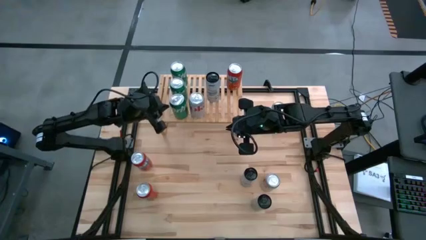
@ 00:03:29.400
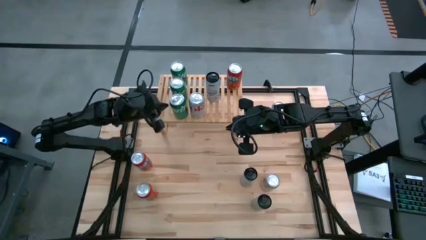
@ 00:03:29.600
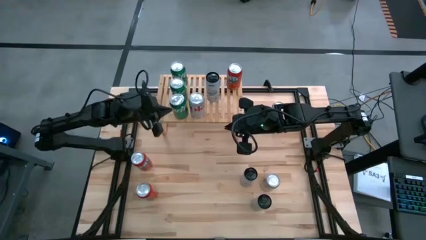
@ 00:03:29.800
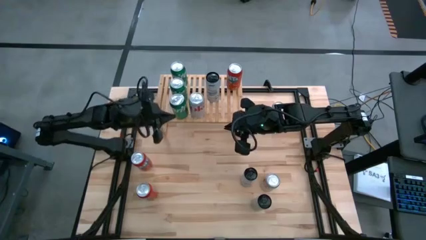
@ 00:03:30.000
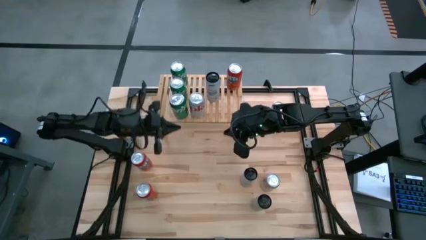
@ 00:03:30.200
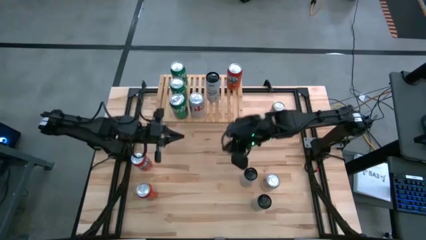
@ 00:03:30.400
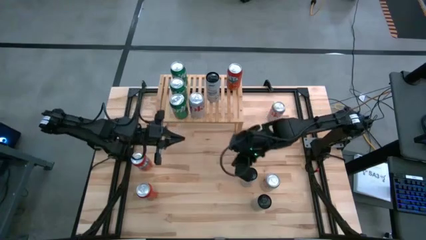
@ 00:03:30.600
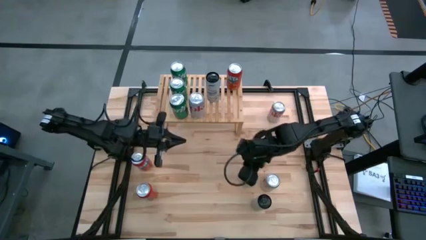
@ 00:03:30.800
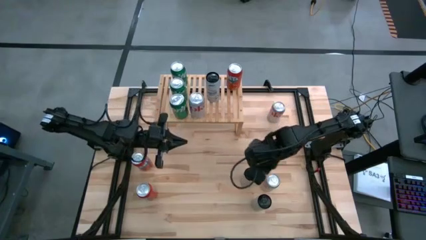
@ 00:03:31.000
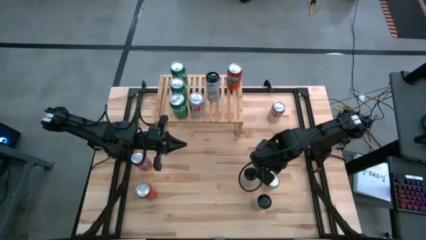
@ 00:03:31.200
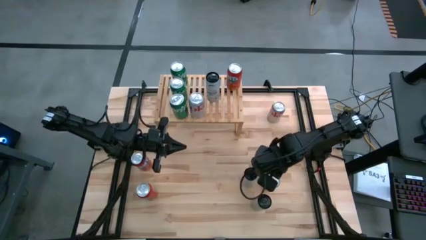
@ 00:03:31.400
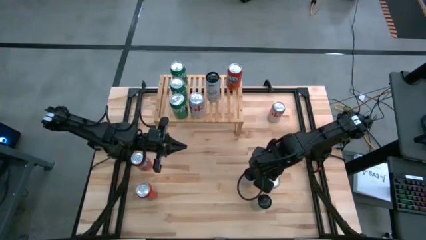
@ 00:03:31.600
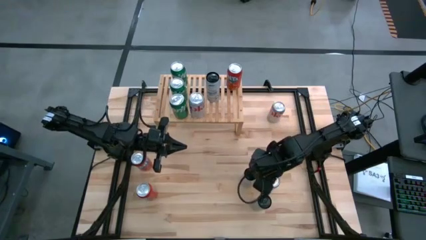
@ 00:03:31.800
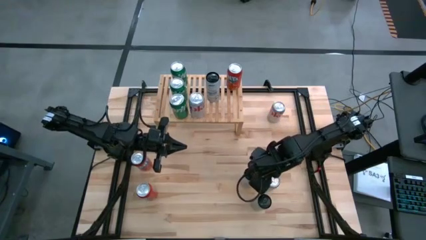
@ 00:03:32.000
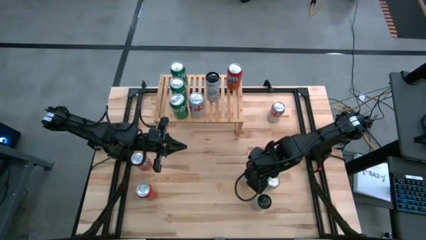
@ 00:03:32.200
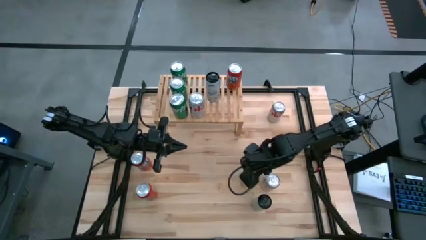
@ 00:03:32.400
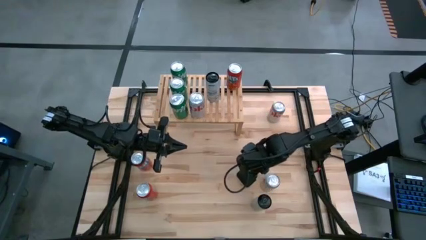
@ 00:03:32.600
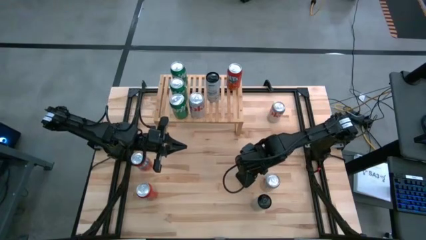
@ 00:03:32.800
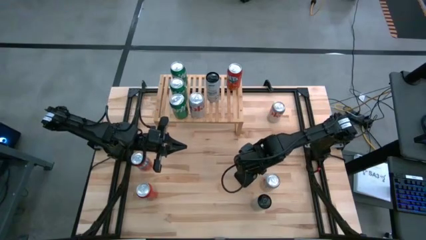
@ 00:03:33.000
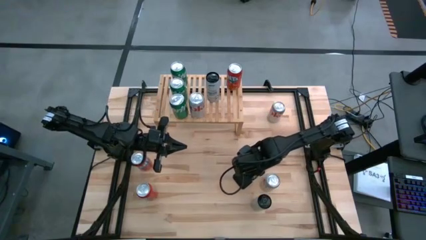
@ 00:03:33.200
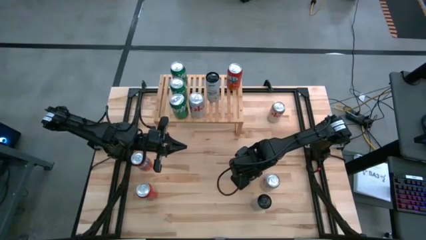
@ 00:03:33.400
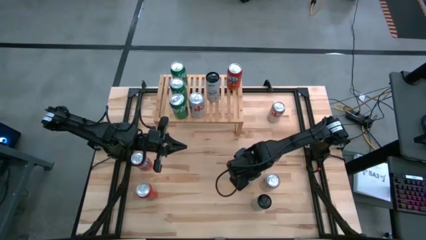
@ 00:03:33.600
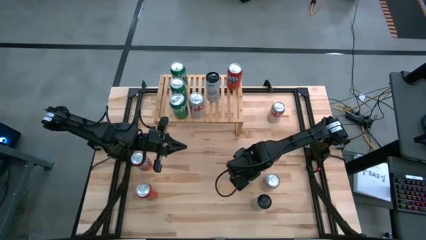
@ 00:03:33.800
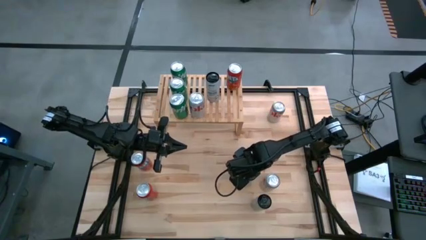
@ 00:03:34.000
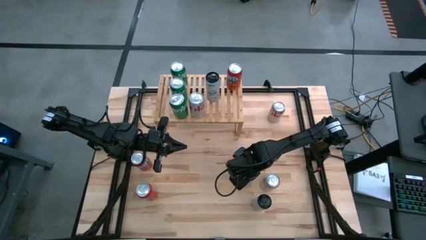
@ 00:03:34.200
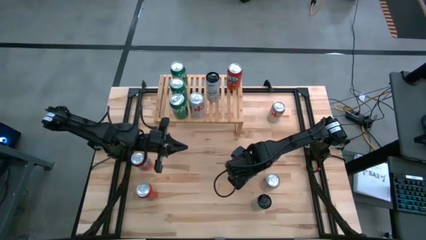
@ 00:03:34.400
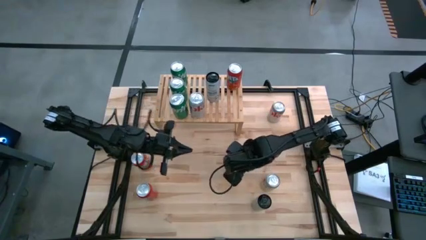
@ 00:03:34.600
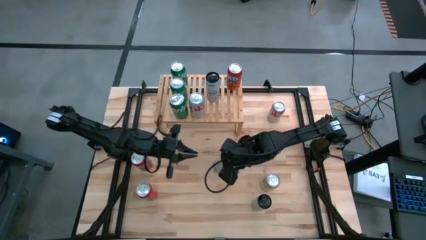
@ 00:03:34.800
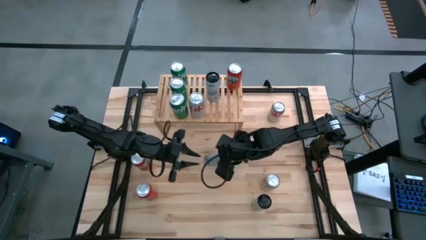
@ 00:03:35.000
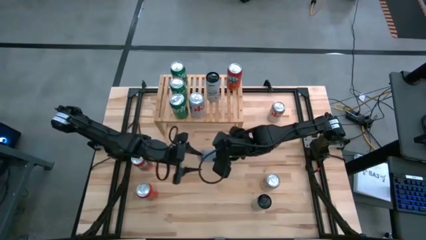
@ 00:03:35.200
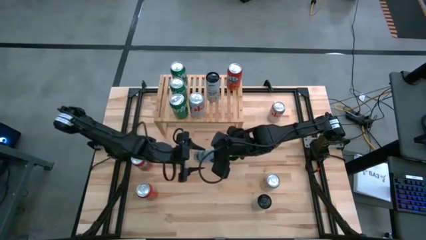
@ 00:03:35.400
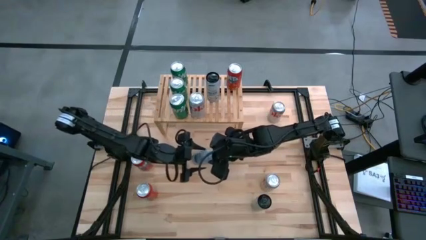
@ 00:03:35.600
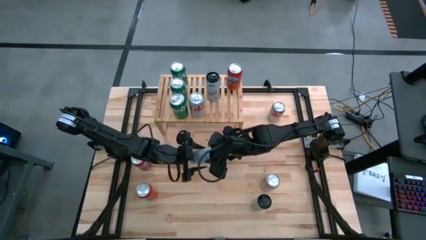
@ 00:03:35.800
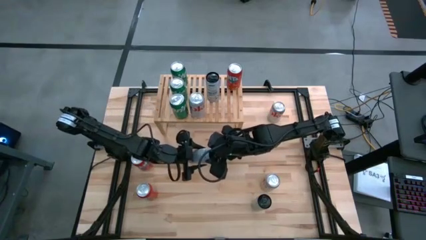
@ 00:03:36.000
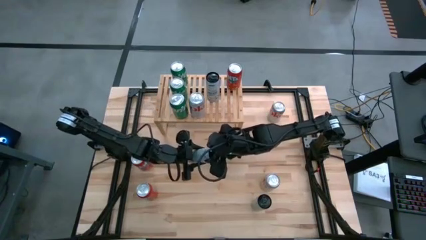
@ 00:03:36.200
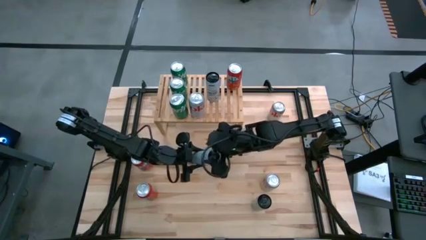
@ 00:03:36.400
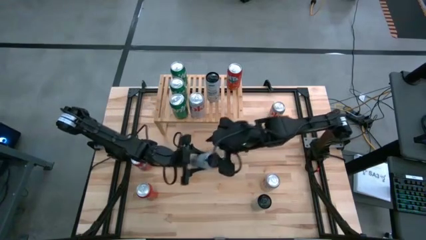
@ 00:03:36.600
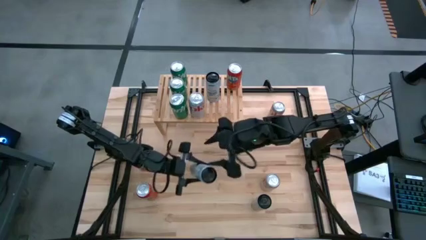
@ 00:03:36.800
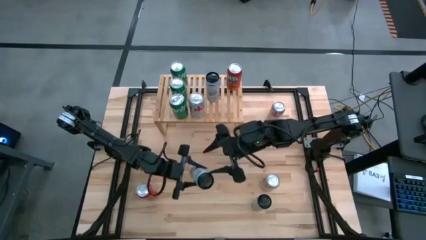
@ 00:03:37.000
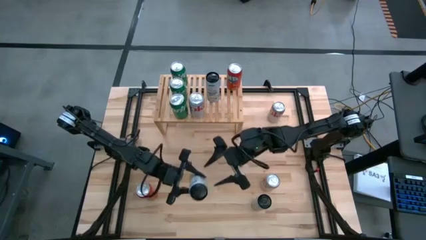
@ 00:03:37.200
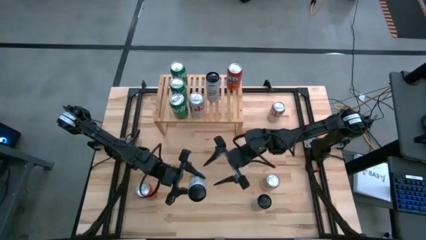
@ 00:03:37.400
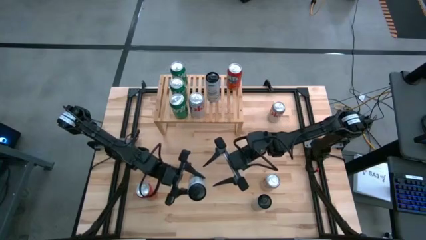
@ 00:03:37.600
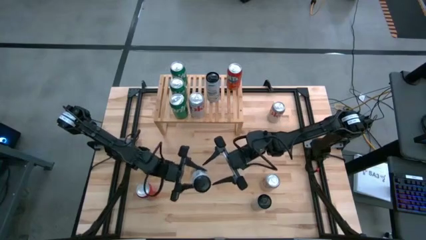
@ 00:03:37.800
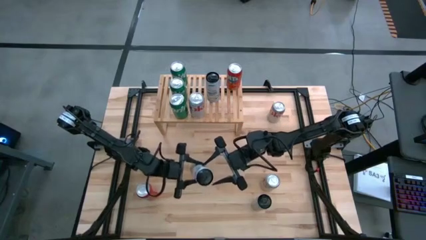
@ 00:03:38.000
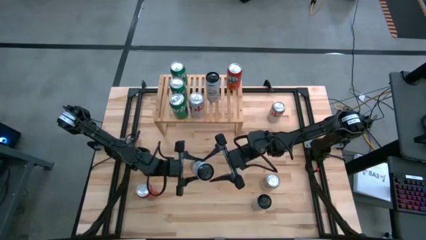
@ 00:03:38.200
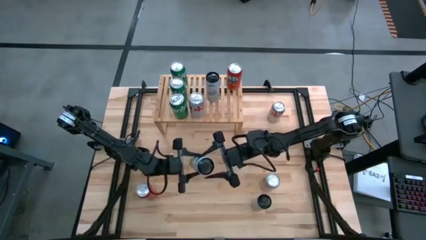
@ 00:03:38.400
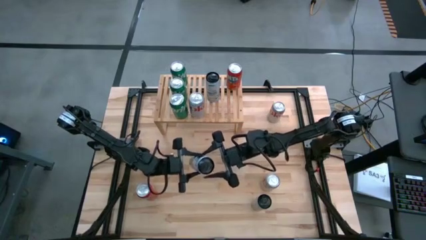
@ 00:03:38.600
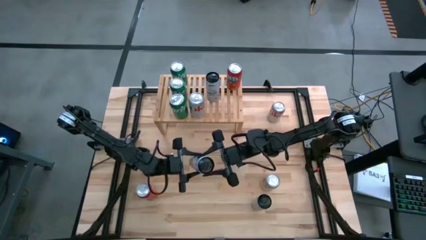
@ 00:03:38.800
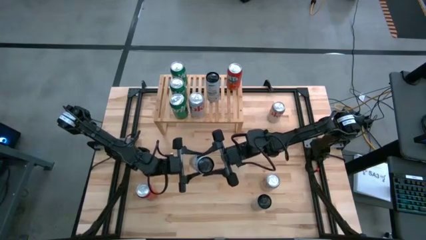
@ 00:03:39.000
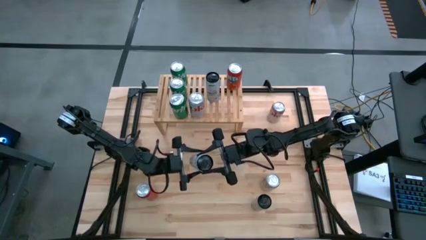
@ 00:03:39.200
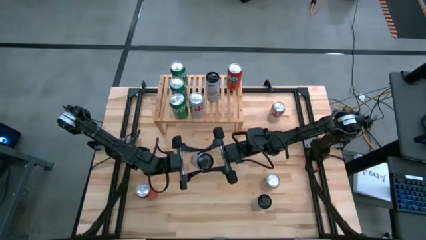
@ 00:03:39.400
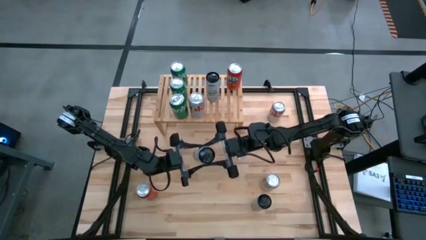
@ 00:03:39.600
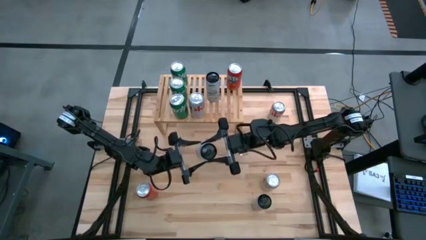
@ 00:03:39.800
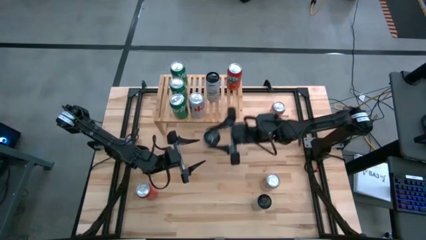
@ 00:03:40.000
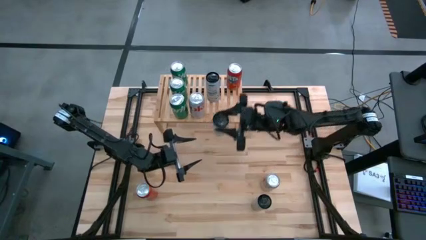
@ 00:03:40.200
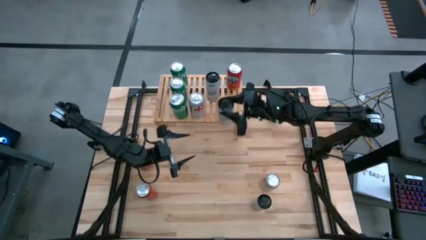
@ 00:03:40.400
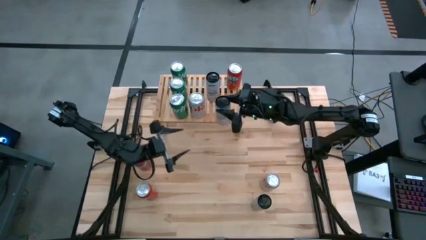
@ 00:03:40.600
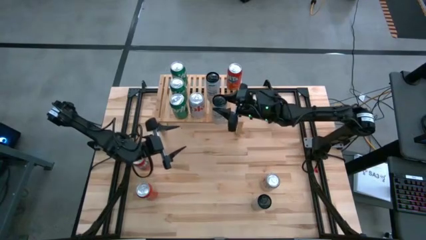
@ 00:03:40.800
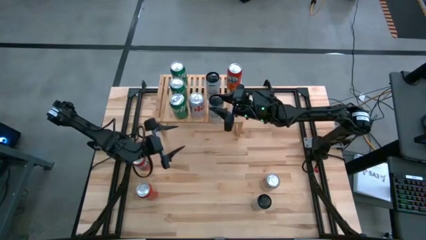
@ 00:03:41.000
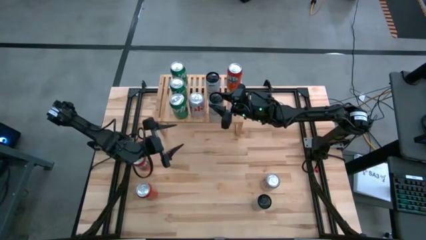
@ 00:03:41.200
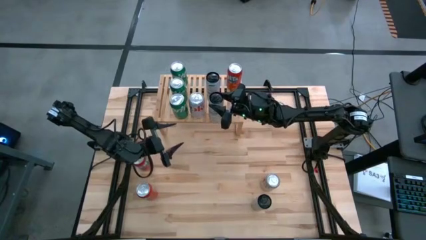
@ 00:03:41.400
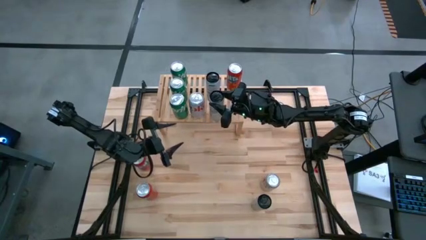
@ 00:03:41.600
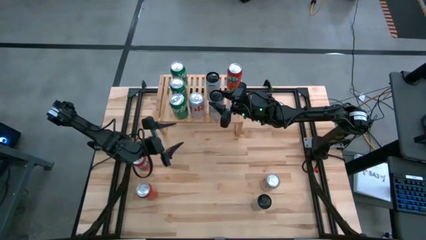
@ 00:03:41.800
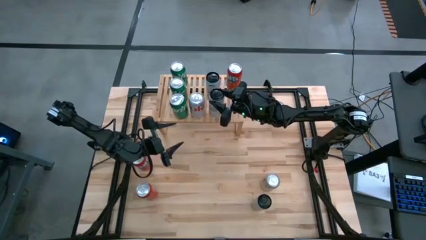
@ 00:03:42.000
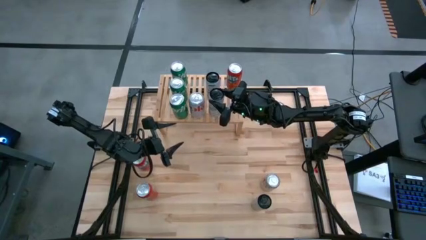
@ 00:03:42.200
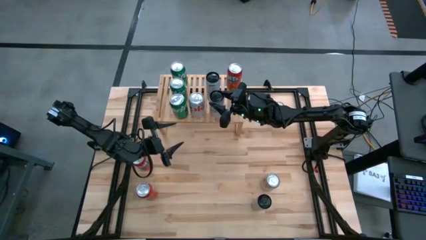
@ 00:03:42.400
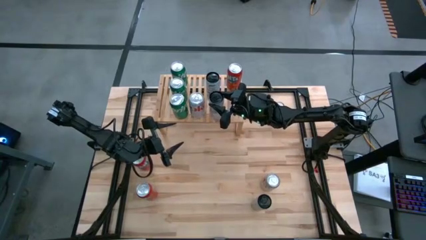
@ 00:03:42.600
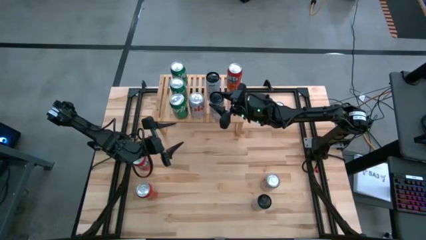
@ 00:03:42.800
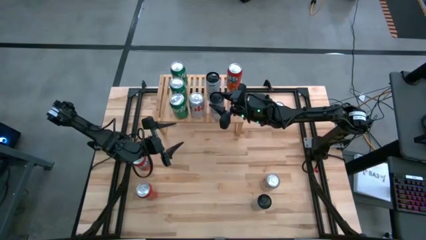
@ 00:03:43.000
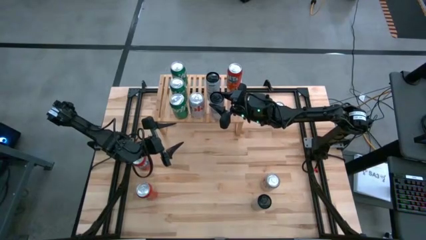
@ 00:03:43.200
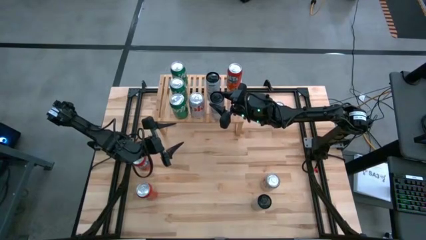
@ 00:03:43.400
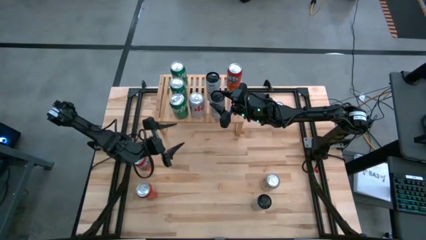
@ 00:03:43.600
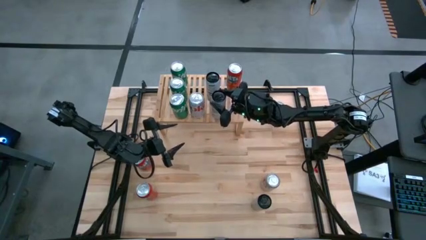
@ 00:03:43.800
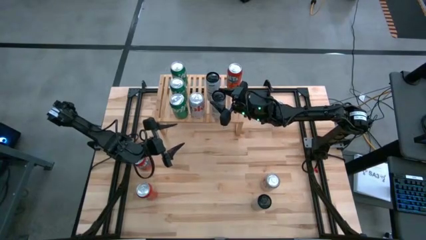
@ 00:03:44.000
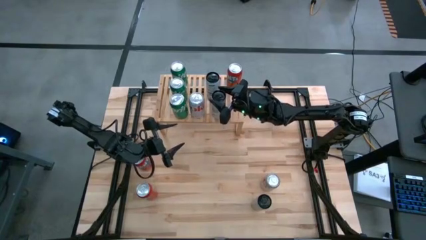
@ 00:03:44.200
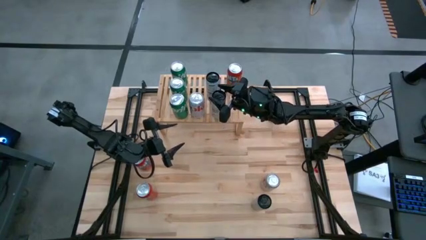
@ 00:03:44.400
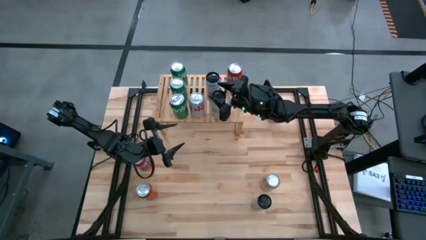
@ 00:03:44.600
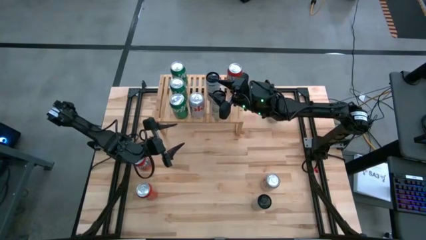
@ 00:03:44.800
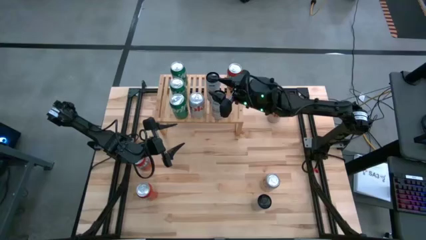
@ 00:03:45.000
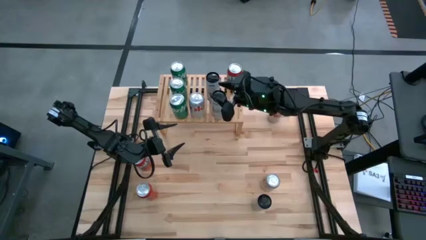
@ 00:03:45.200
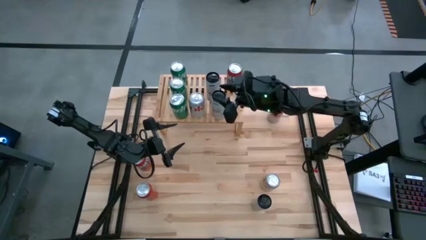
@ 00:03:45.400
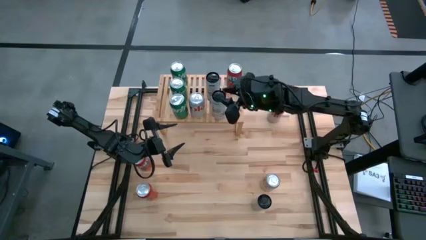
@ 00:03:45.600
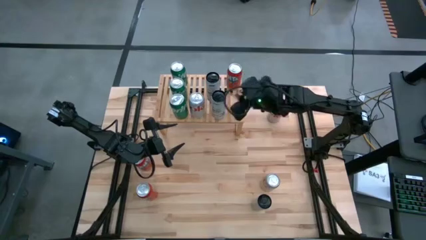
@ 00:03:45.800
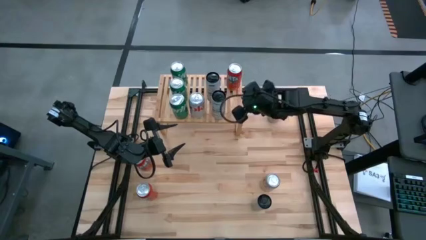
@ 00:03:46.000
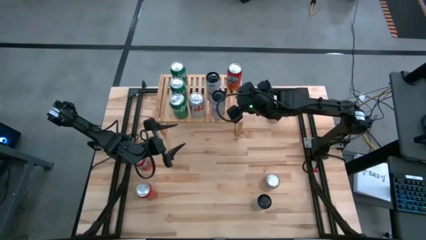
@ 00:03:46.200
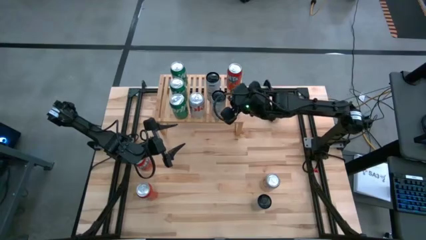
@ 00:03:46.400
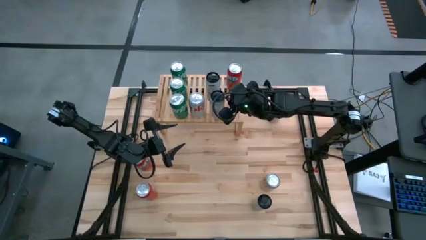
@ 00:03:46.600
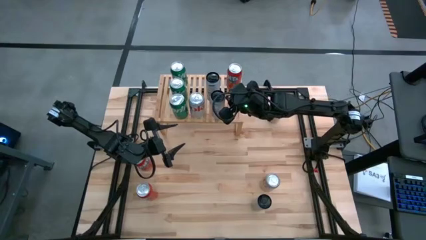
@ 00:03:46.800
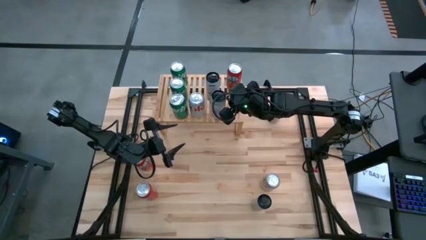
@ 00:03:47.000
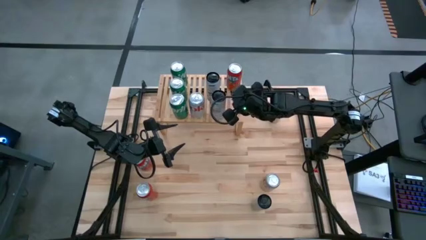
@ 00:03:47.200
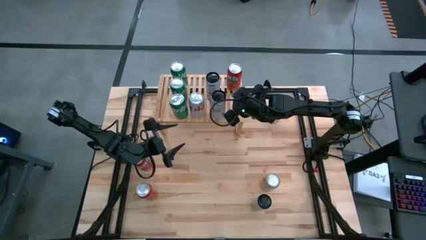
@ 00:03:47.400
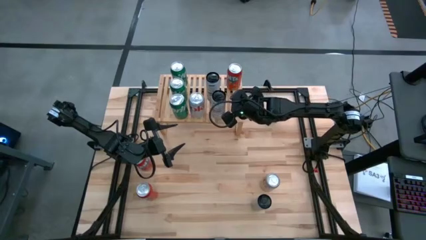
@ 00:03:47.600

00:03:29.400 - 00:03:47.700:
Task: Place canned beverage on shelf
Put the top right blue soda can on the shelf
